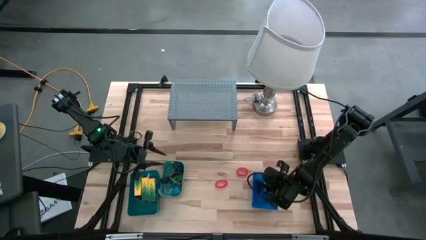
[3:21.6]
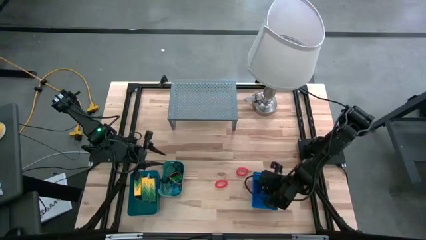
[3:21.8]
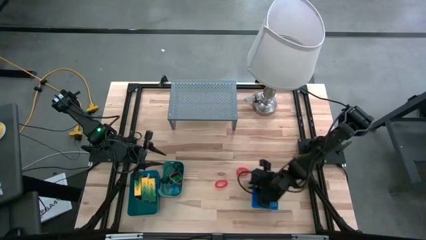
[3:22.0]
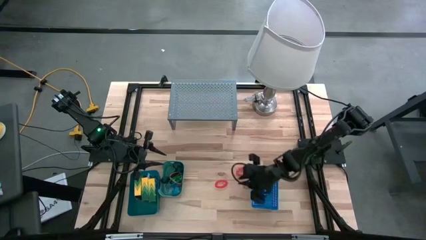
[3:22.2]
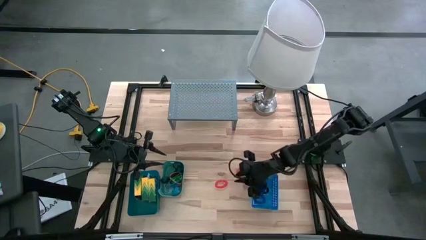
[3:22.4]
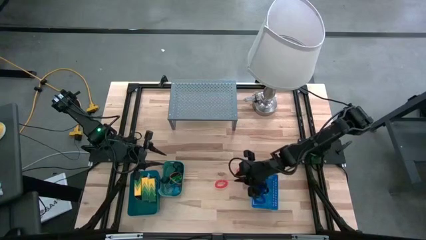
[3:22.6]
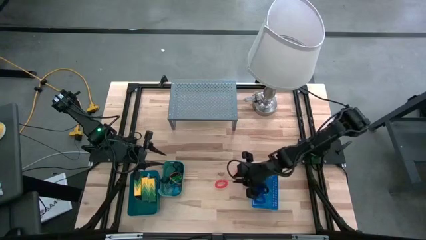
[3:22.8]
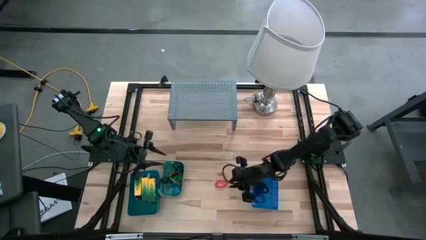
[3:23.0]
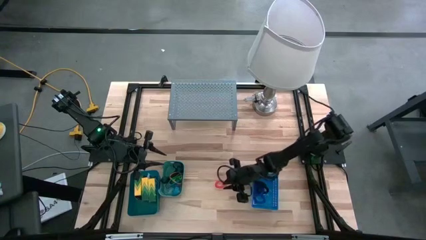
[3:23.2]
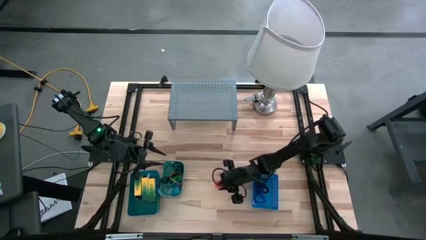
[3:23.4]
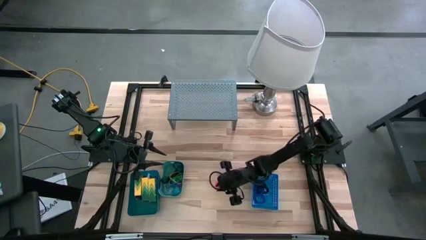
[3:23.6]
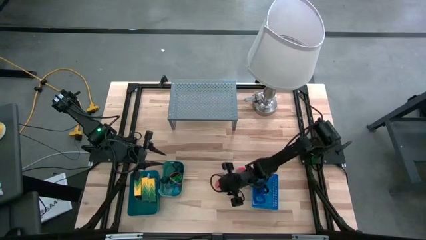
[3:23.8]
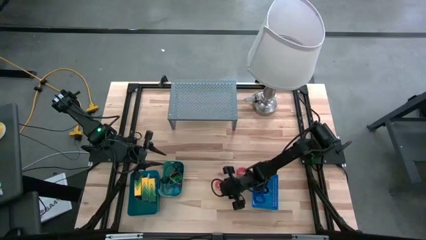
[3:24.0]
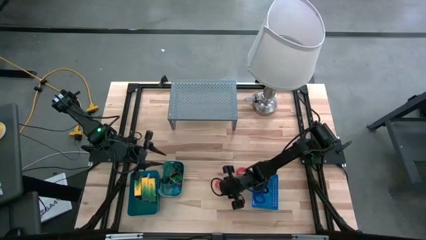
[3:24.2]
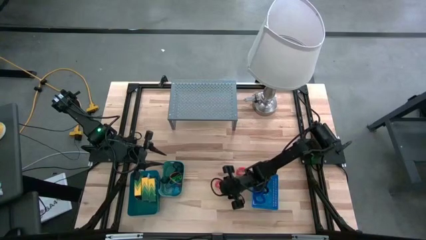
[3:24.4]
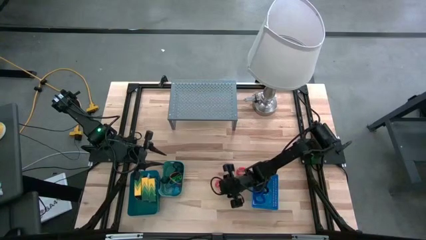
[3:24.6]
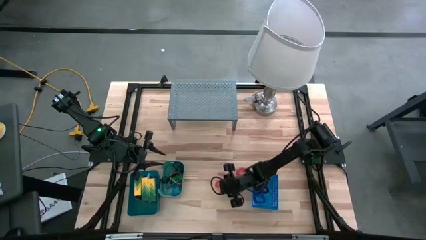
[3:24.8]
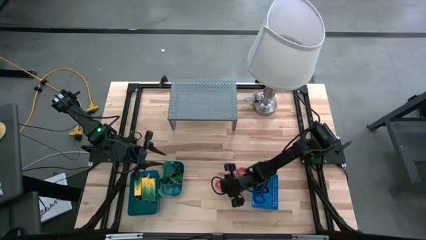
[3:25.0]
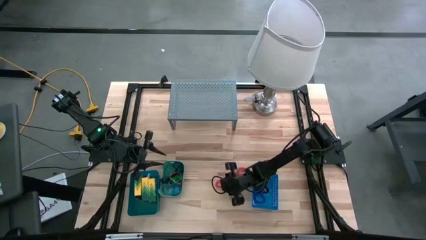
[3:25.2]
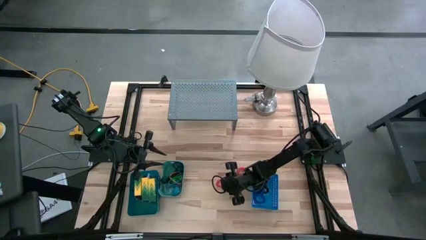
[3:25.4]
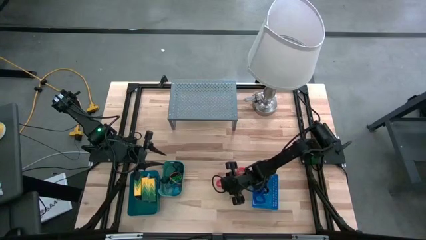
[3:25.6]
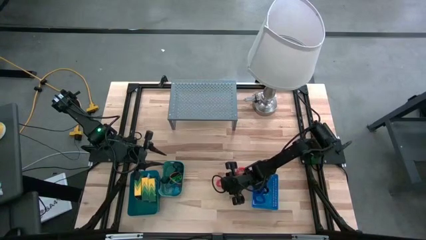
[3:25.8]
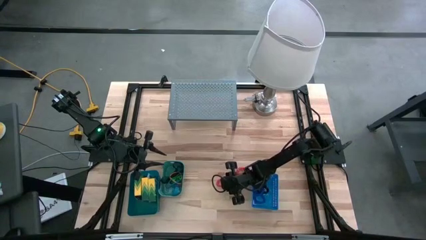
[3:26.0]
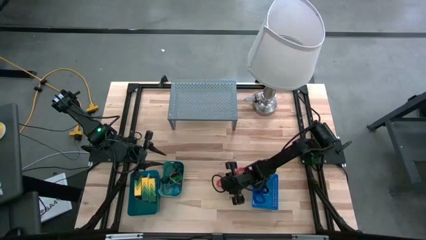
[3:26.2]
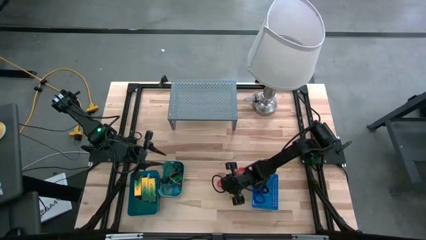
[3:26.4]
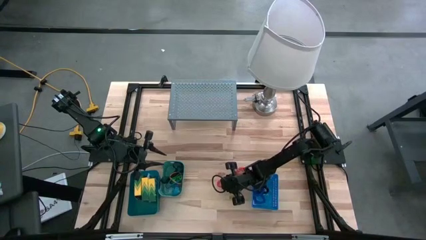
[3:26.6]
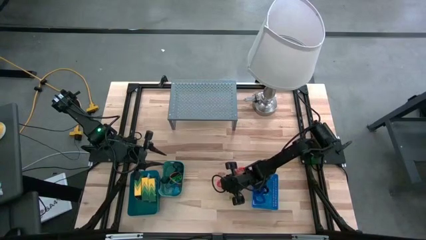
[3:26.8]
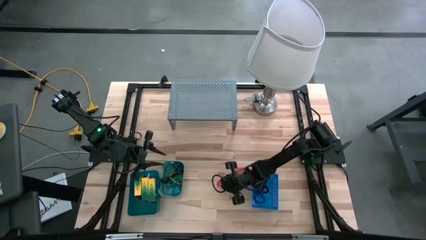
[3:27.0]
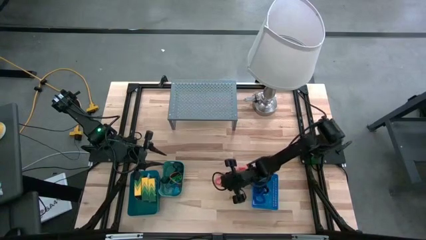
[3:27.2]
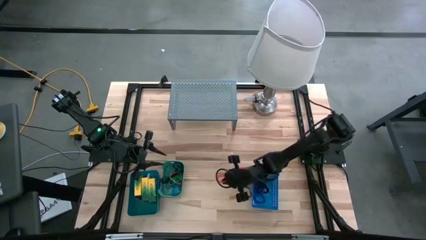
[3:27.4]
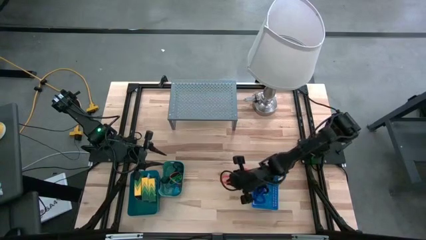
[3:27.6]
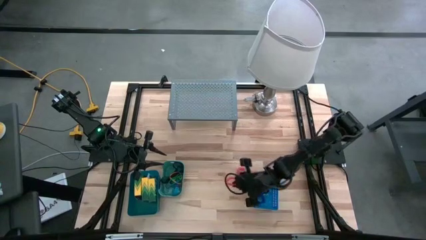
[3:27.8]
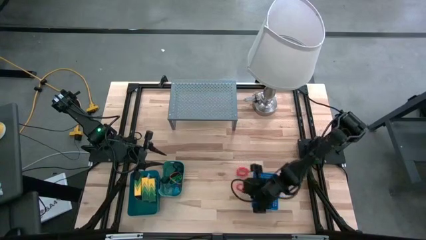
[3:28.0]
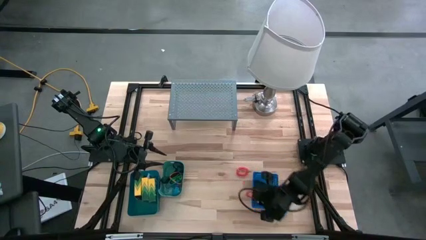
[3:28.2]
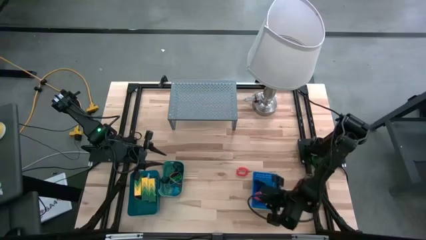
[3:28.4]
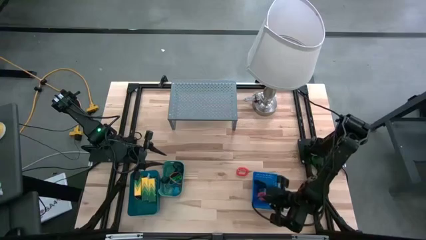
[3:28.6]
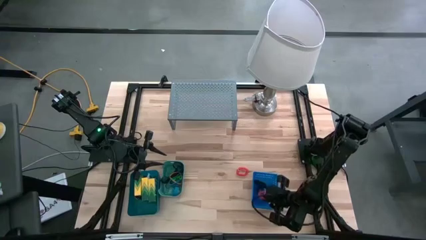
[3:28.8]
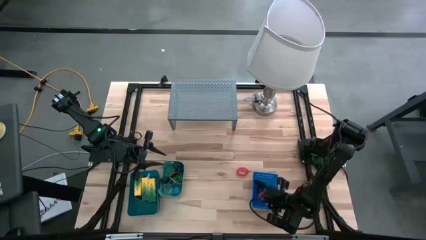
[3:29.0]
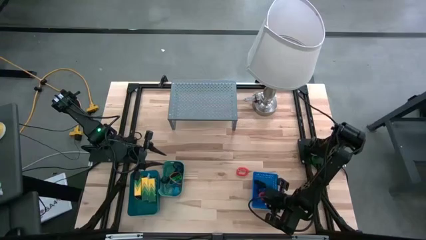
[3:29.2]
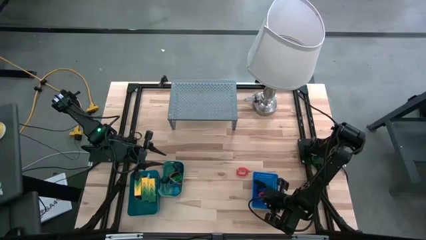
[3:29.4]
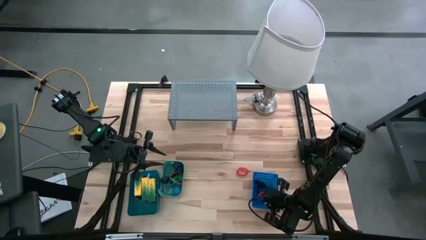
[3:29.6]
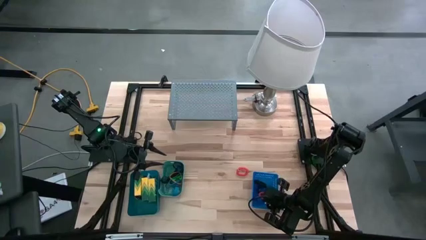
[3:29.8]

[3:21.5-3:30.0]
Task: Pick & Place Office Desk Supplies
Put the left orange spring keychain into the blue bin

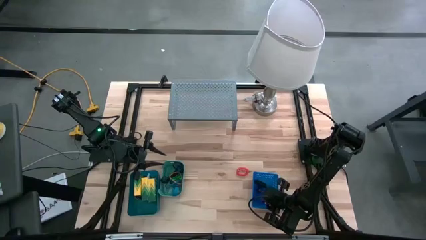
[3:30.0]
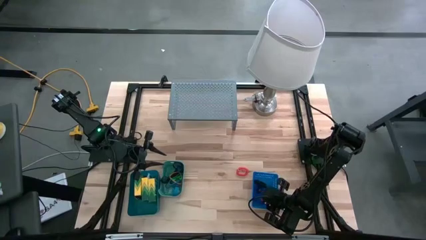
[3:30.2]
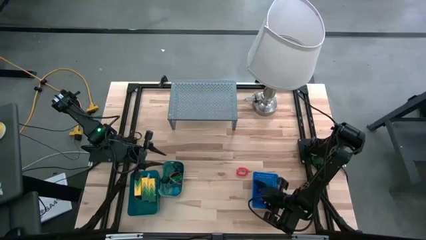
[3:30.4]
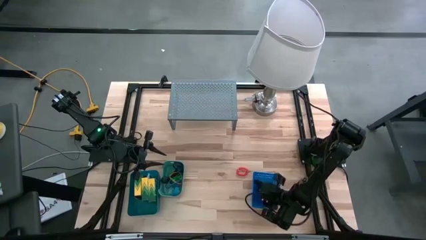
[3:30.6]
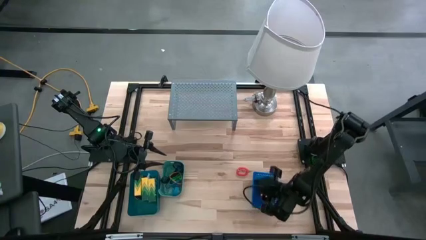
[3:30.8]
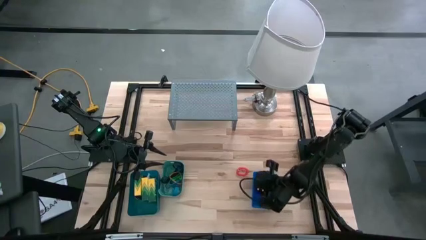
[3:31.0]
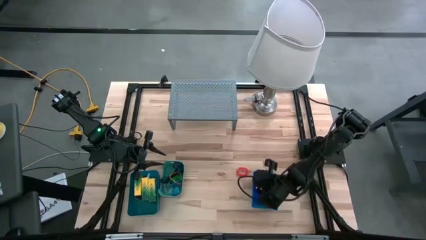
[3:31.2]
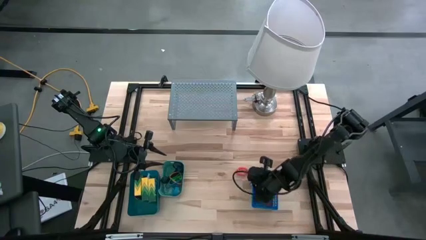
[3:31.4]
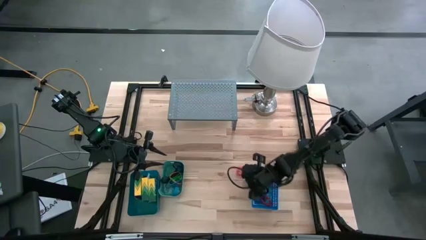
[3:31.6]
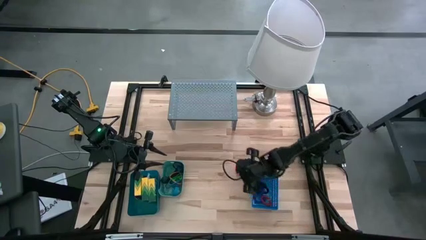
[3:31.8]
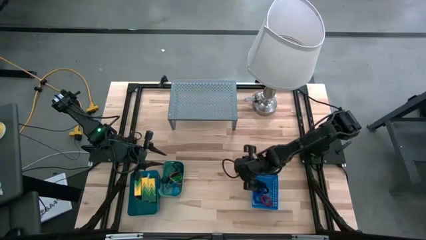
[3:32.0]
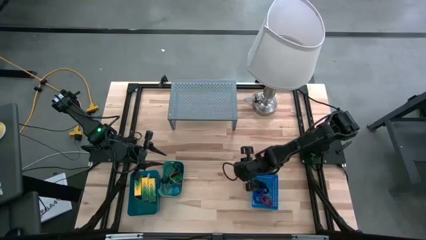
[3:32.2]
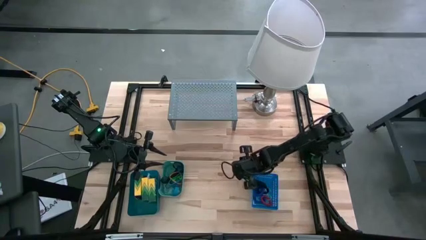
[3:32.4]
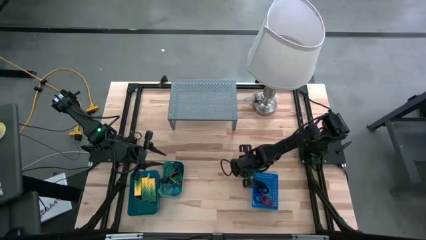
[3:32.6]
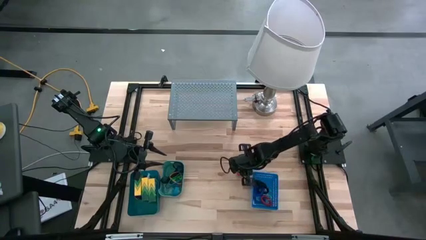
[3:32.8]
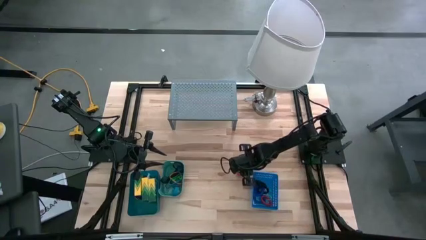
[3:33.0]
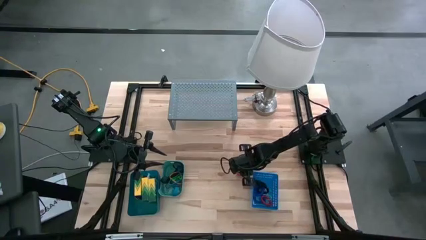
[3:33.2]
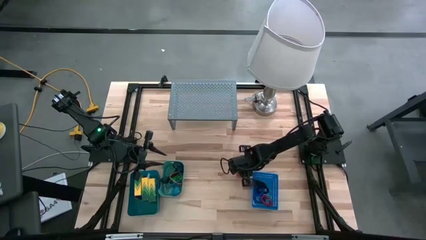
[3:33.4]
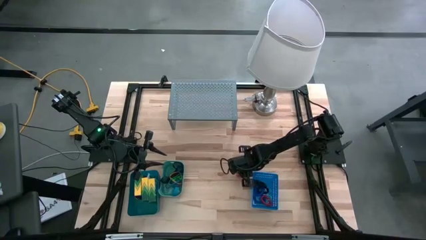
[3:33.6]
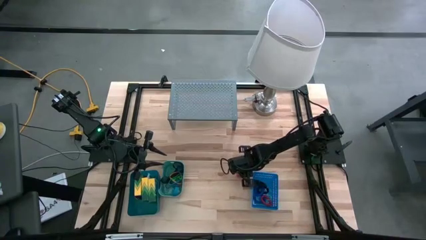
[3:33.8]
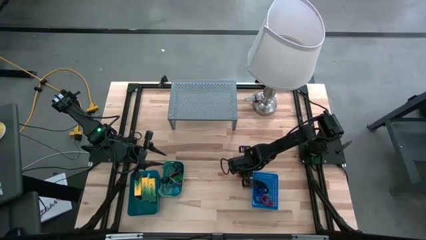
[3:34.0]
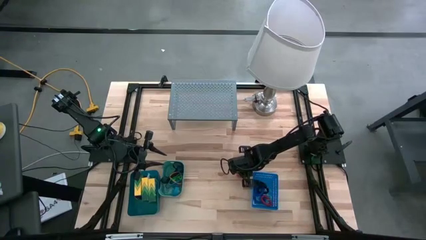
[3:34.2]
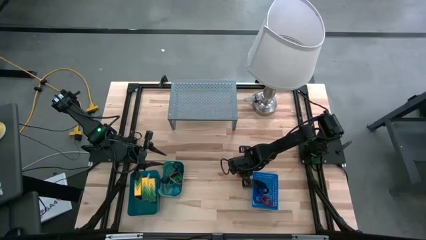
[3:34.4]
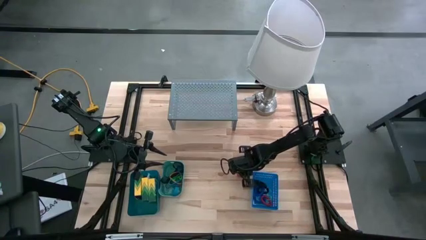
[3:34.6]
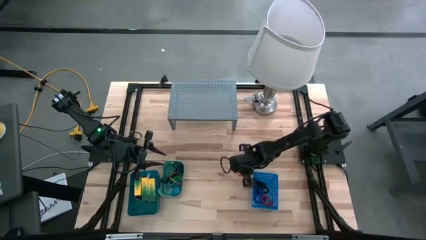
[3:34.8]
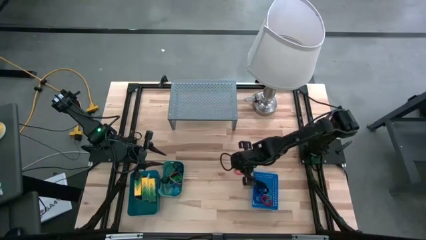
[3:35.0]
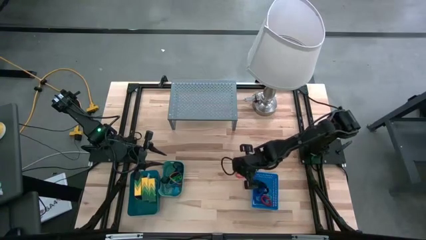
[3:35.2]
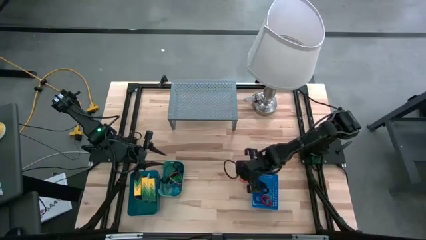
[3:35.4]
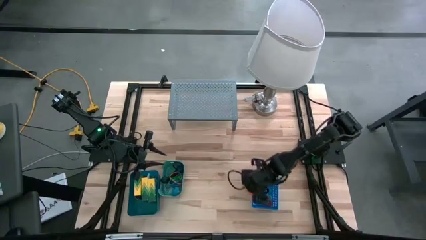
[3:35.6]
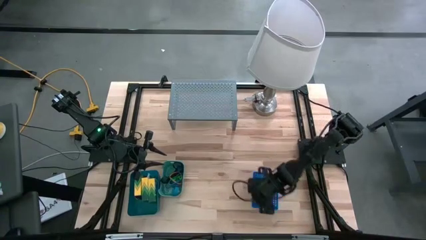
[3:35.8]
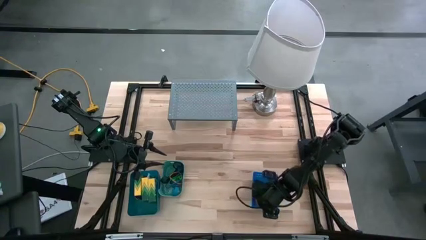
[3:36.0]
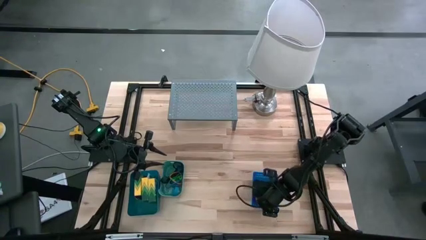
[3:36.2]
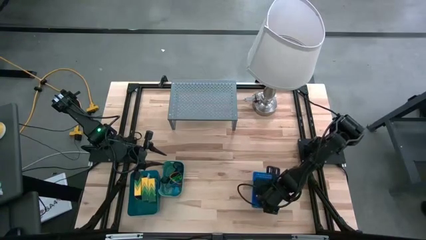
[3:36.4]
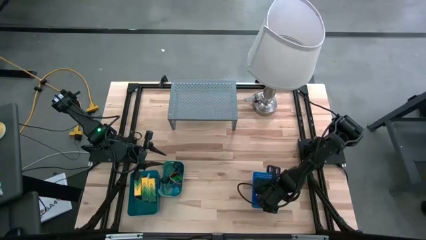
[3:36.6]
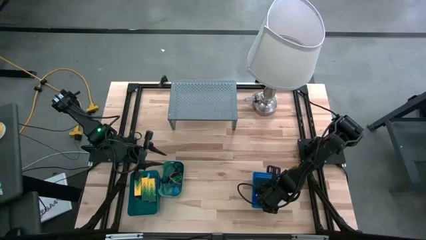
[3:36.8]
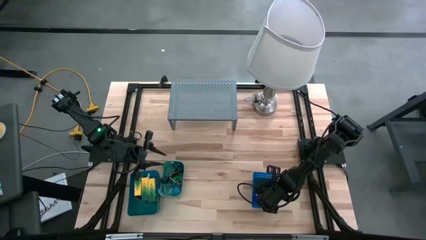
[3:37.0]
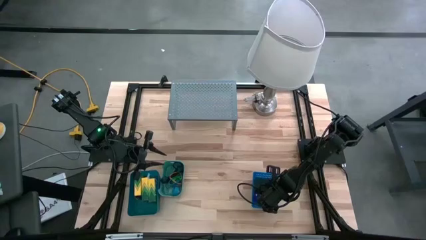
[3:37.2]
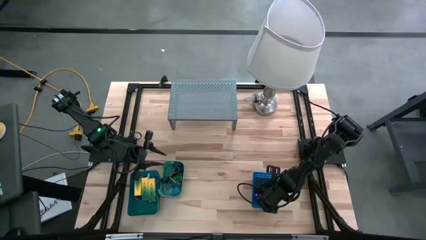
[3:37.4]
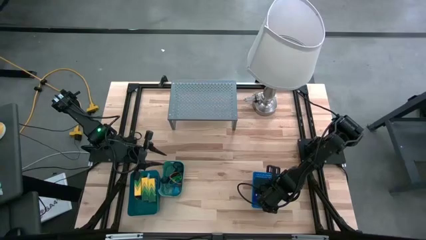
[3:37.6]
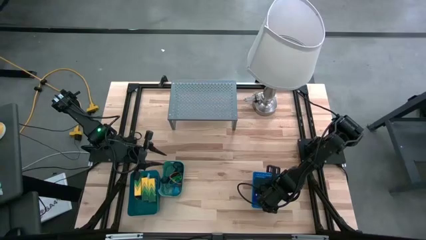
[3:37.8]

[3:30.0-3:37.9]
Put the orange spring keychain into the blue bin
